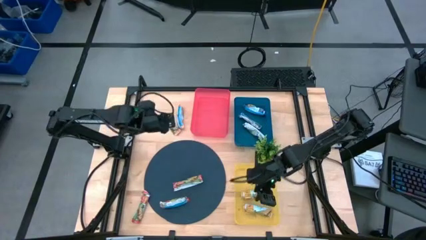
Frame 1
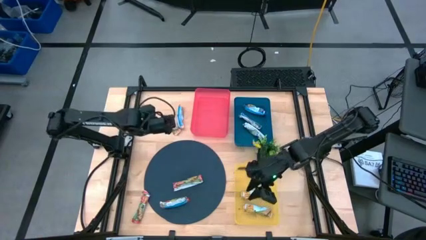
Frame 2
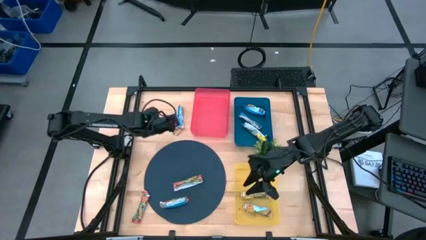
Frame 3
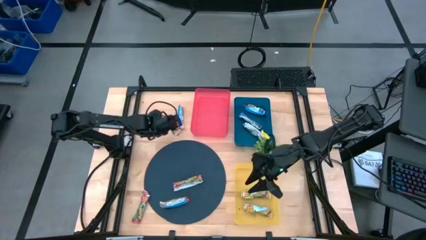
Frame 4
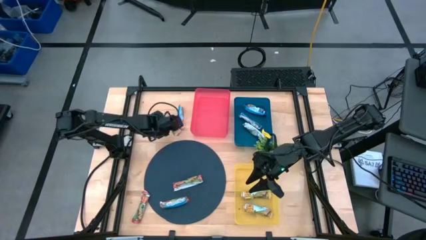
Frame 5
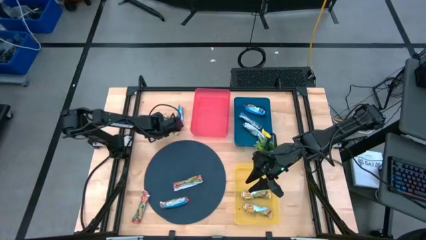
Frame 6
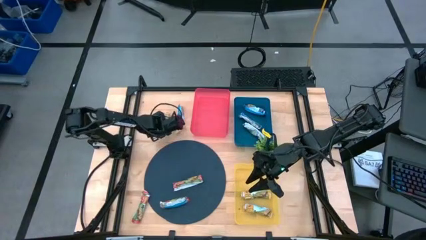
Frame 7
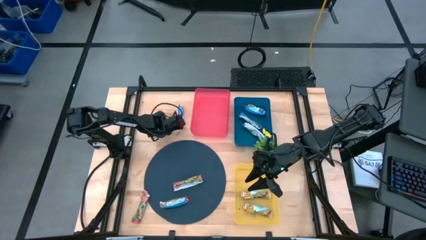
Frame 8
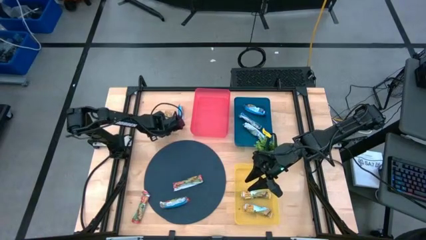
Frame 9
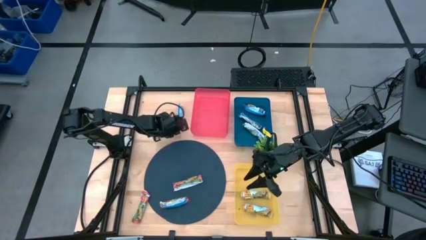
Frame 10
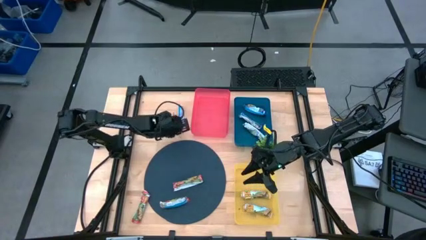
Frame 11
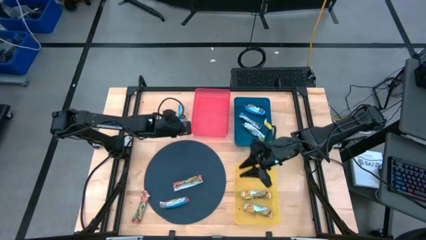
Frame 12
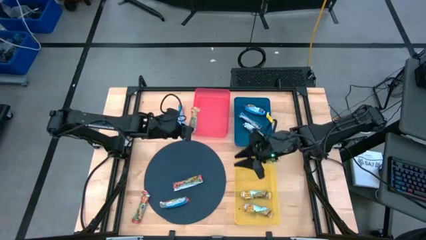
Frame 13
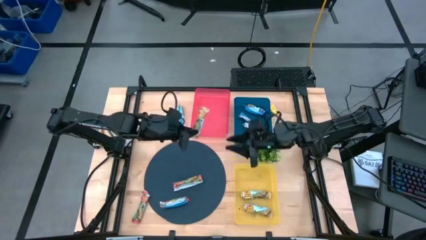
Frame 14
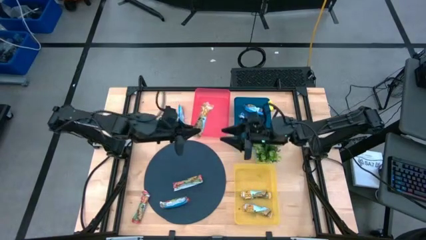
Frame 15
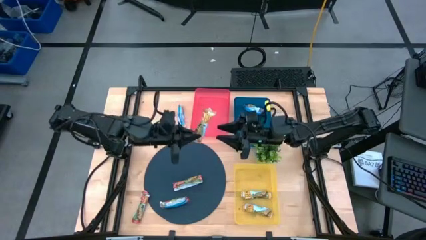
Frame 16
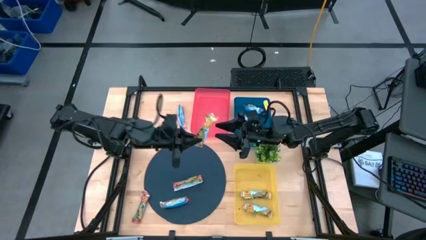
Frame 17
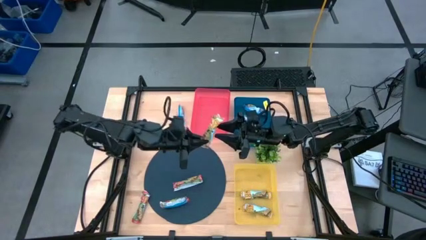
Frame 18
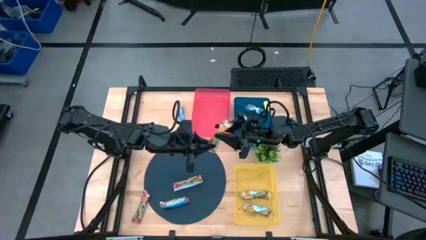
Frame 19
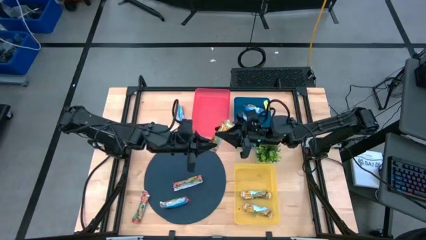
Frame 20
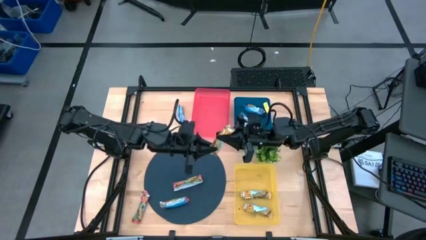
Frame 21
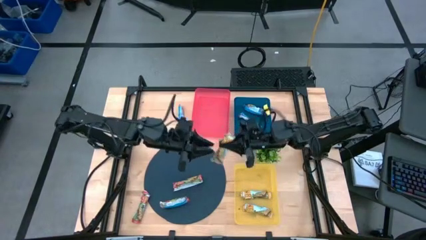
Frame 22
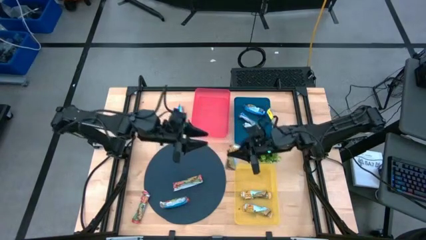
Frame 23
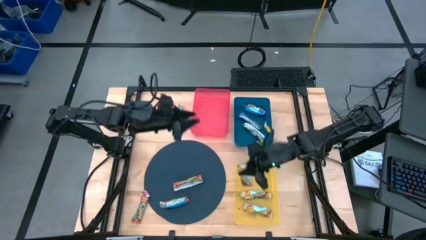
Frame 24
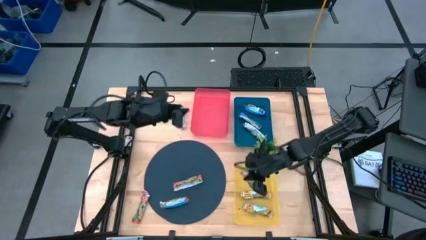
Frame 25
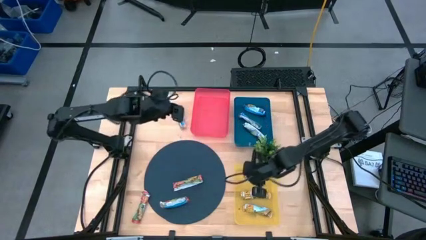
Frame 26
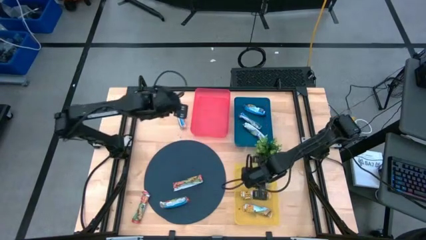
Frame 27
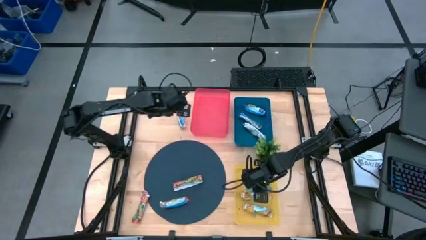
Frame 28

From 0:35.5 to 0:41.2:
Task: Pick and place Granola Bars by type
Put the yellow granola bar into the yellow bin

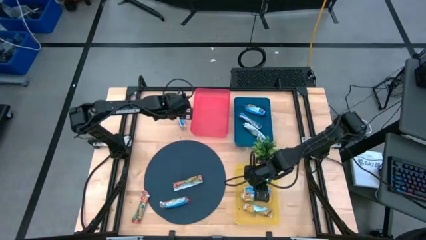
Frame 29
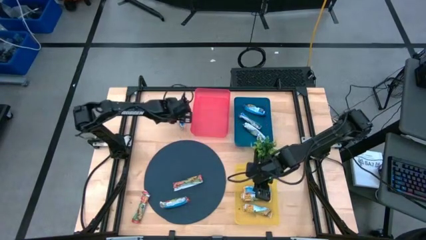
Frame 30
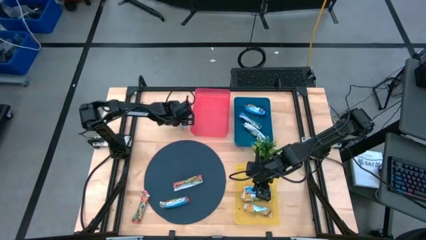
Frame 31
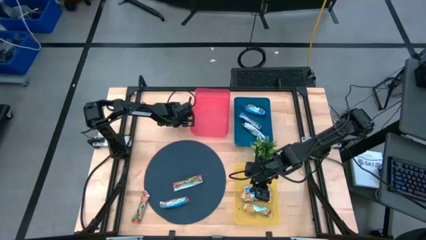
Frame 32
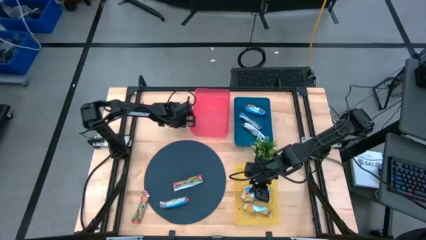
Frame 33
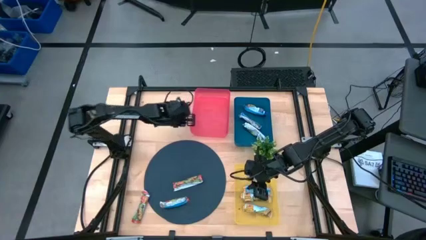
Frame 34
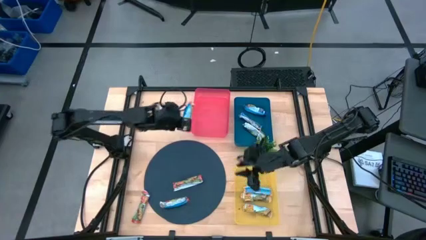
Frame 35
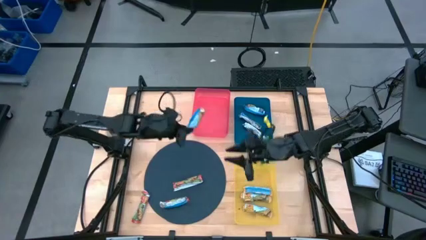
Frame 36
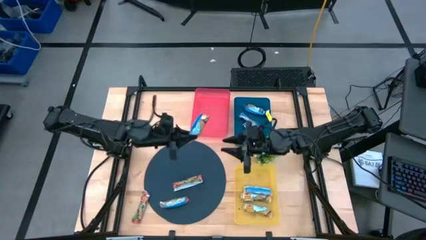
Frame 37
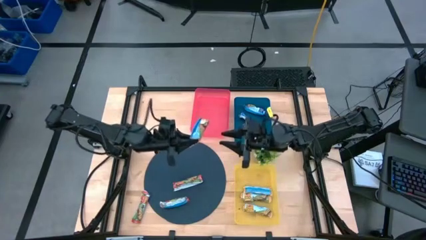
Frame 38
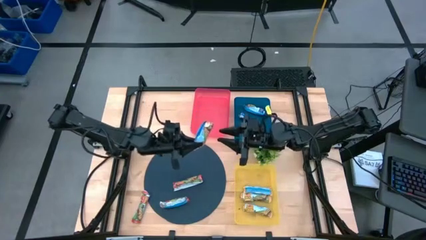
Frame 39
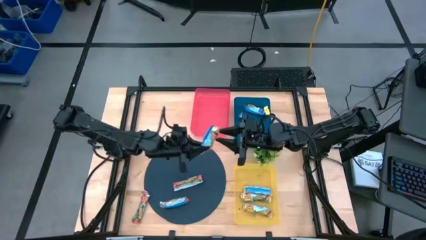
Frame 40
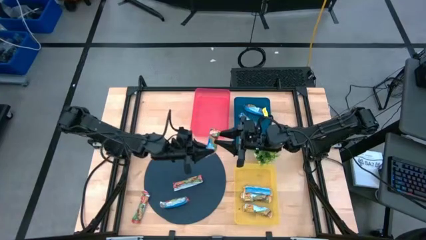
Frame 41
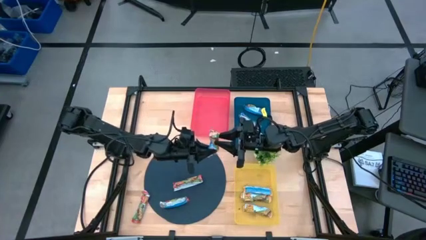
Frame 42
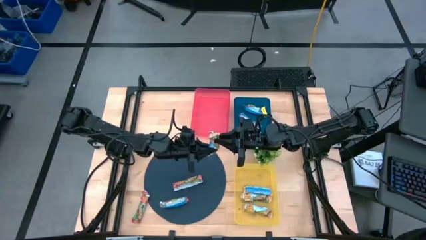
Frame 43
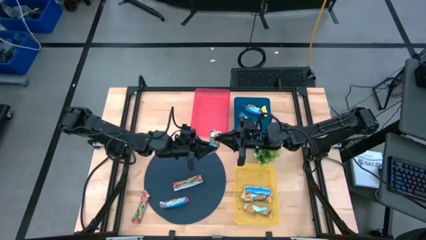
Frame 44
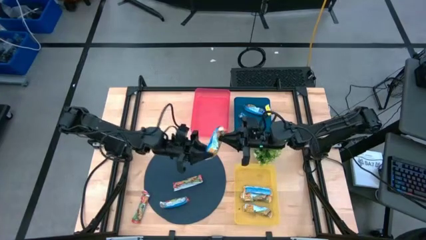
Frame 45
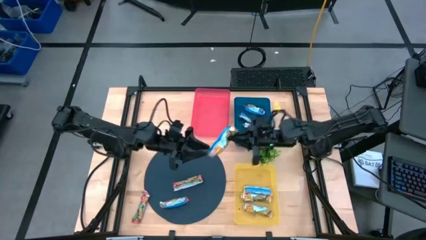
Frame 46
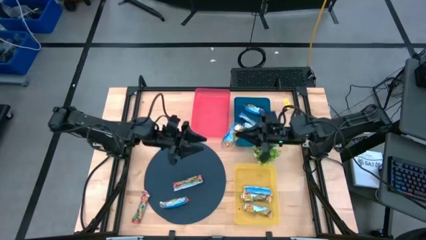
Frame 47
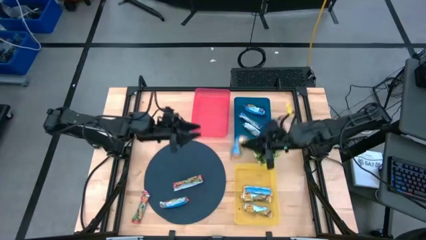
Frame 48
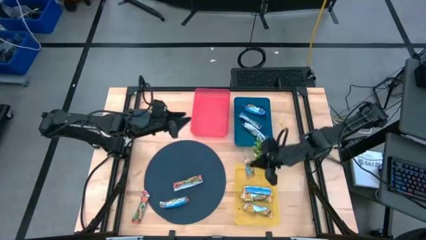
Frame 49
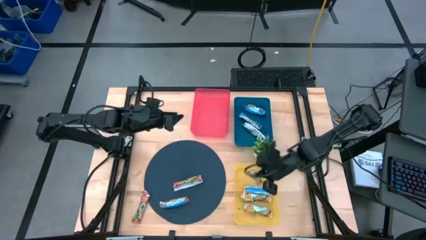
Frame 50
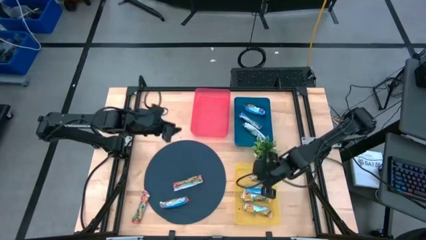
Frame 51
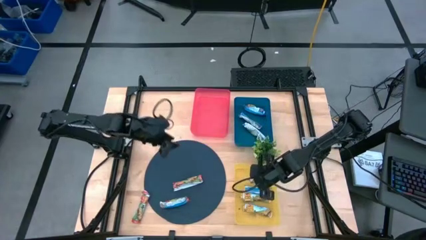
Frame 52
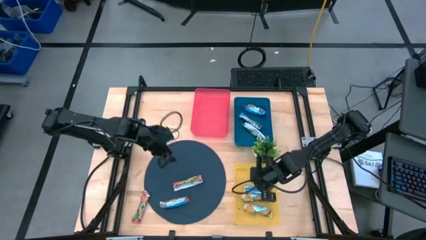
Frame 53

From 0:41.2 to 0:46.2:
Put the yellow granola bar into the yellow bin

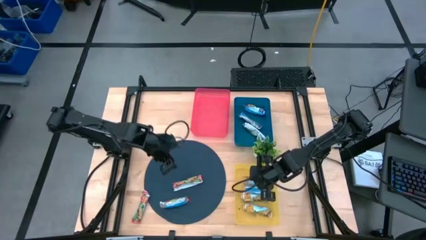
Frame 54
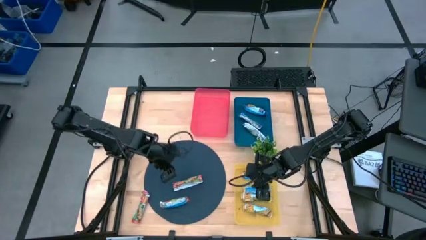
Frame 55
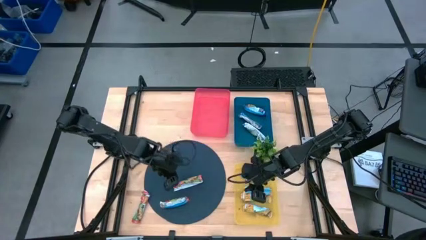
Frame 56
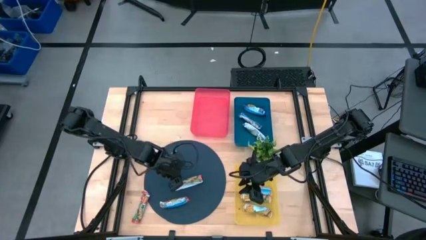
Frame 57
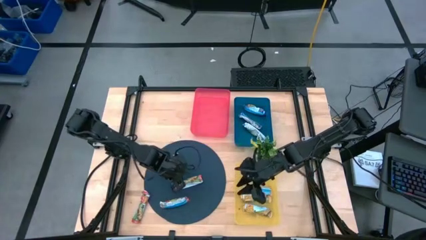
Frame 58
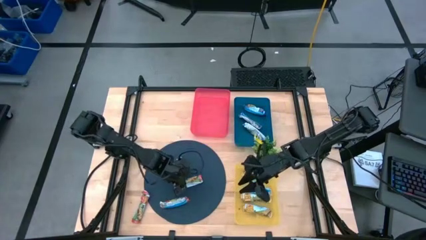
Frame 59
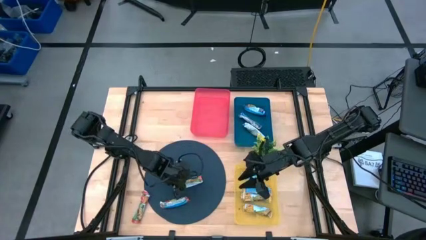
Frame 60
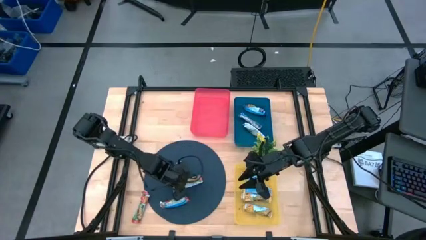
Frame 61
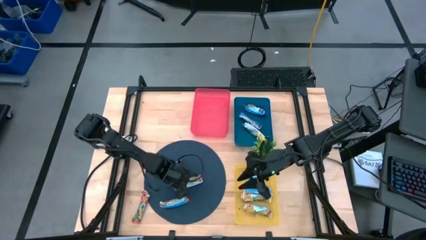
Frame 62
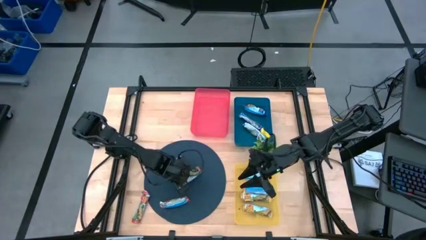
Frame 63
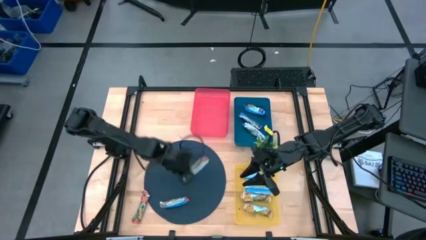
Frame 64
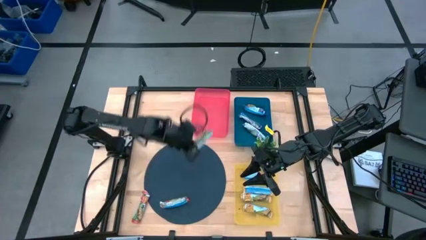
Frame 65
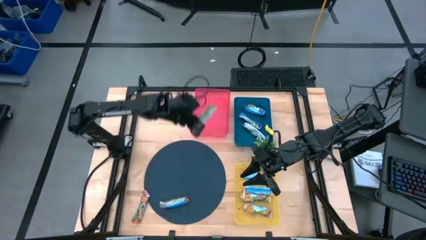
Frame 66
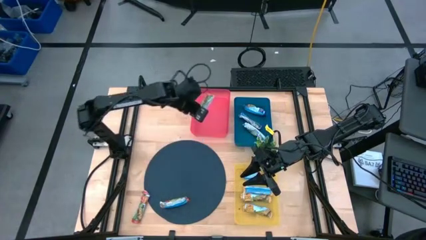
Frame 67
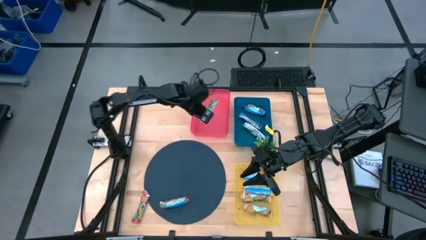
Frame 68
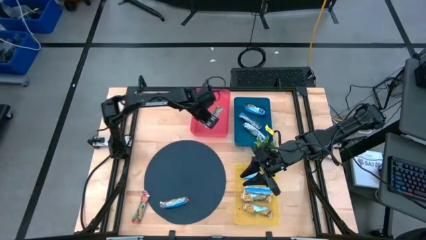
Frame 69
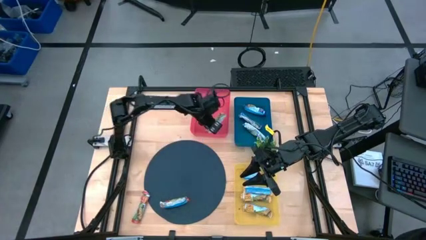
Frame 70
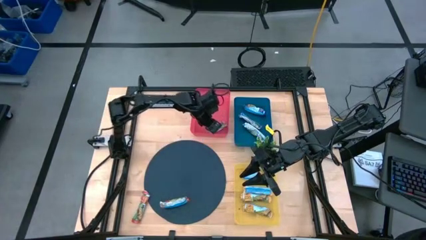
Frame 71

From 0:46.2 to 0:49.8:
Put the red granola bar into the red bin

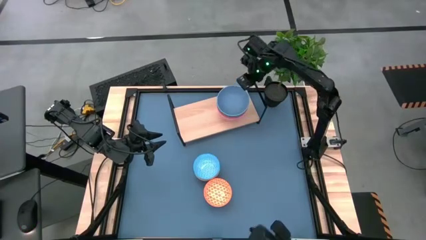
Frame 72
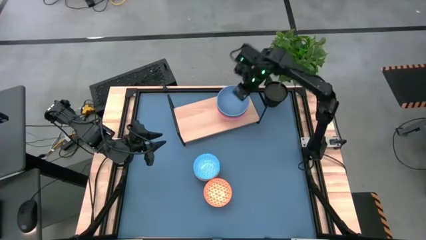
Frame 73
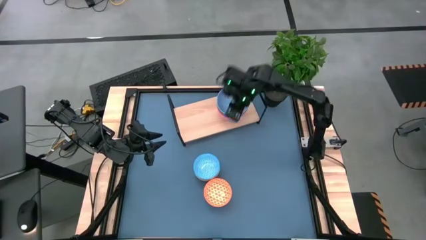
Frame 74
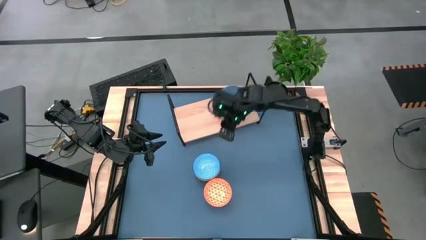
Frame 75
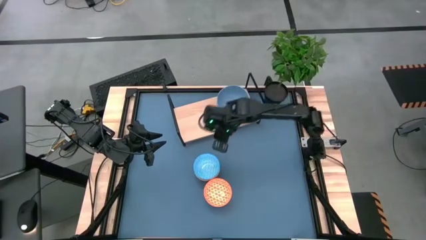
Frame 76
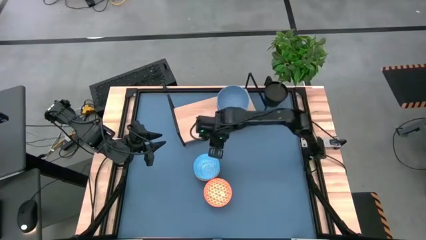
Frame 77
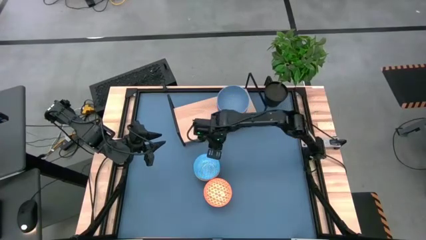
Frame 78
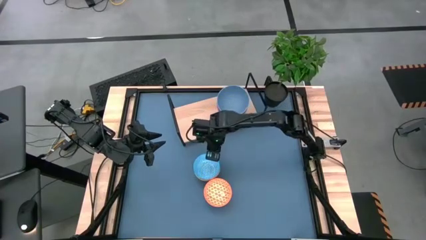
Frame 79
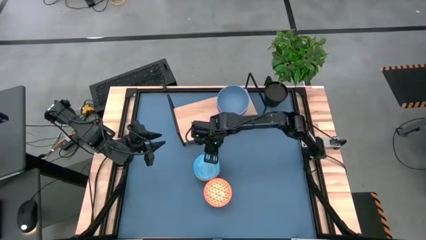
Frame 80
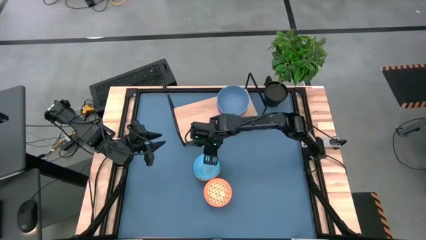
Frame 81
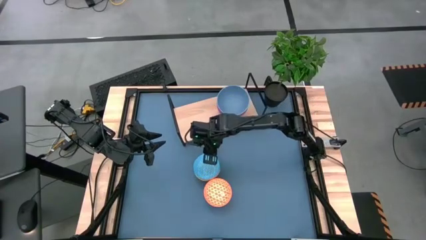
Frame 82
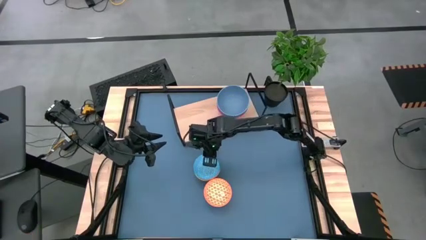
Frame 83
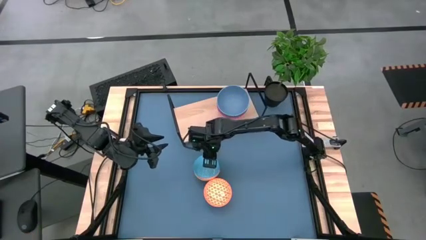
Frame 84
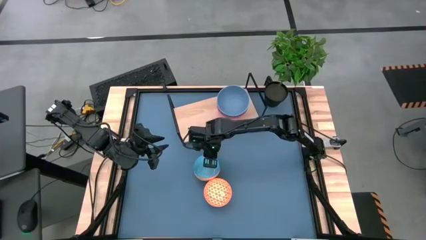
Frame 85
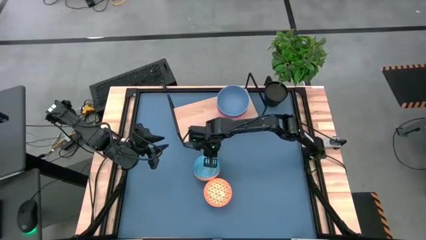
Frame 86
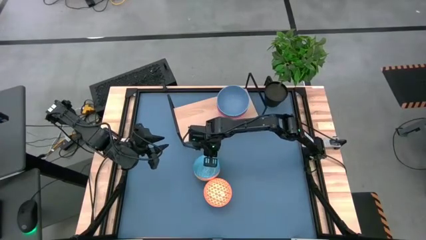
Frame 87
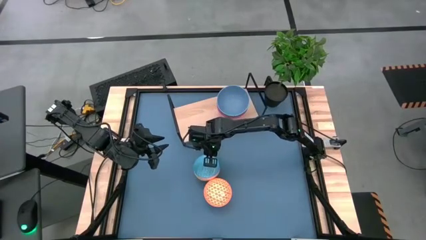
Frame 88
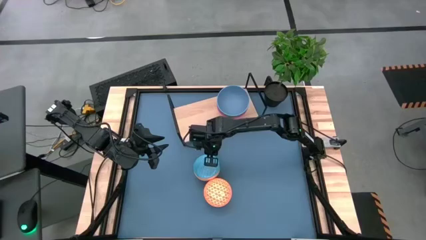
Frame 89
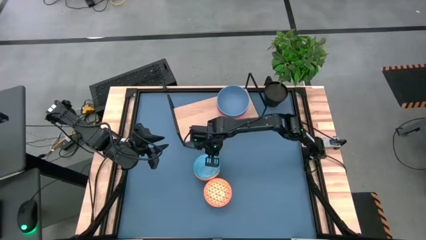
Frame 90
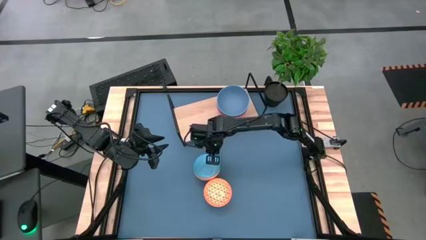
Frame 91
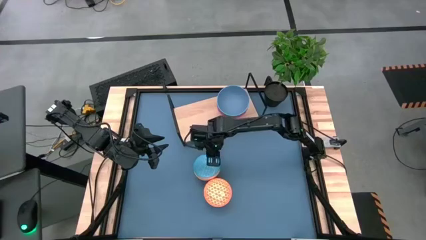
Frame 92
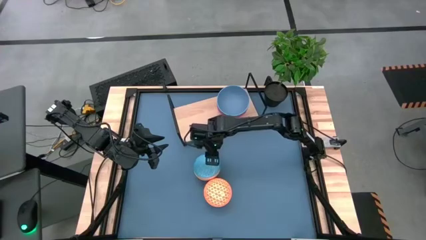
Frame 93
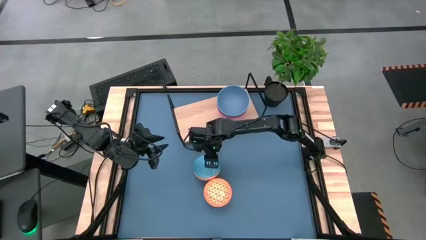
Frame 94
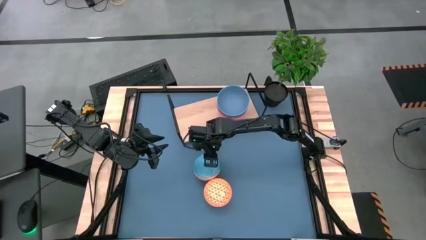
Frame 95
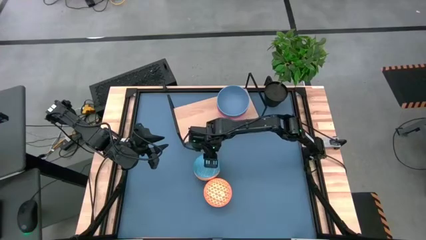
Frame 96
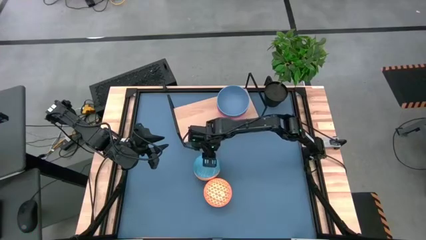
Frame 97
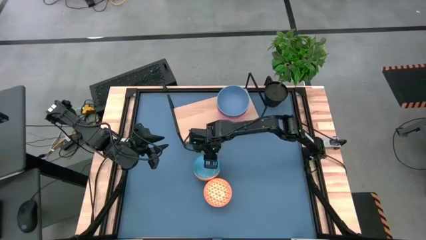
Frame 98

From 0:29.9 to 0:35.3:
Task: Place and stack bowls onto a shelf
Put the light blue bowl on the shelf
